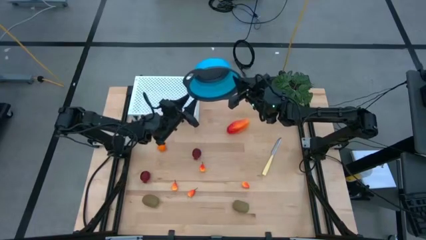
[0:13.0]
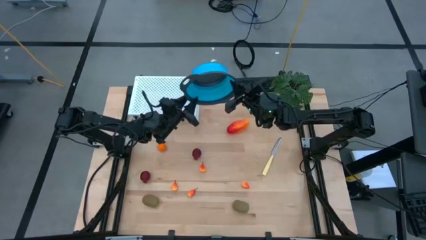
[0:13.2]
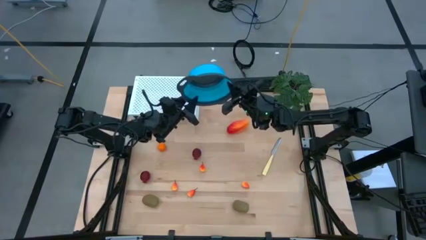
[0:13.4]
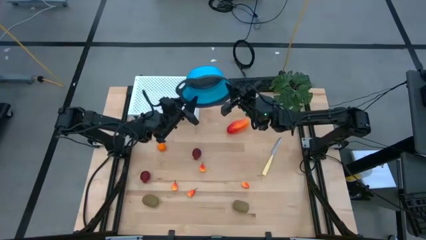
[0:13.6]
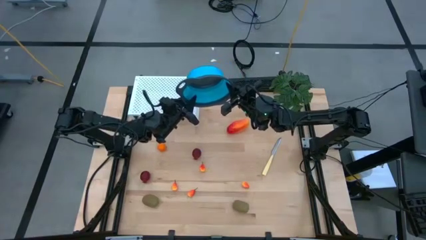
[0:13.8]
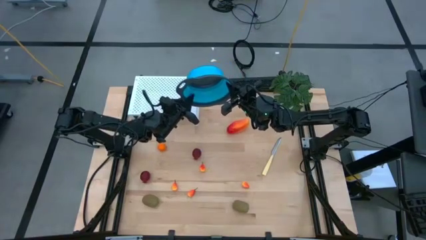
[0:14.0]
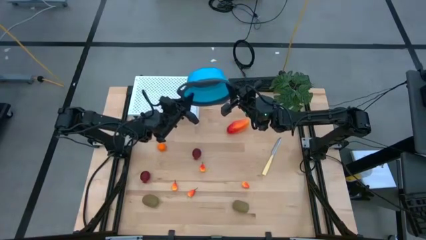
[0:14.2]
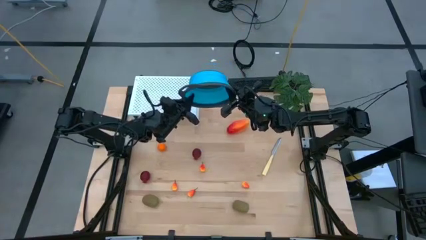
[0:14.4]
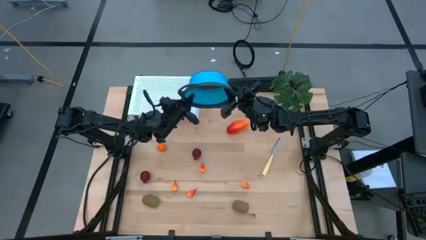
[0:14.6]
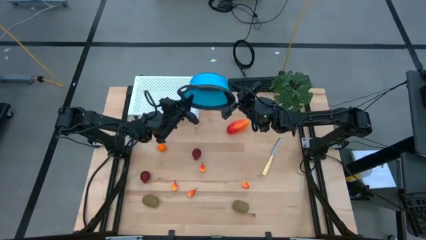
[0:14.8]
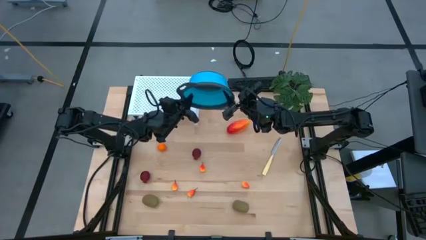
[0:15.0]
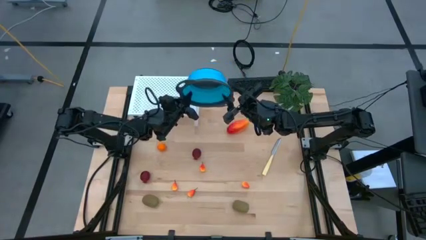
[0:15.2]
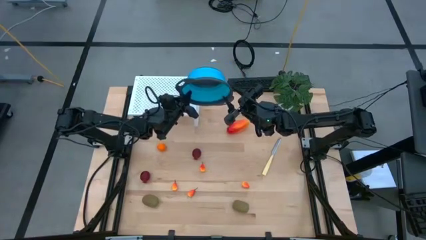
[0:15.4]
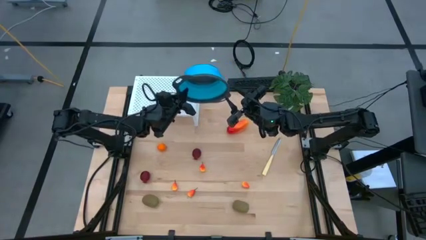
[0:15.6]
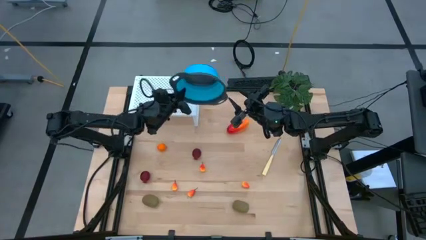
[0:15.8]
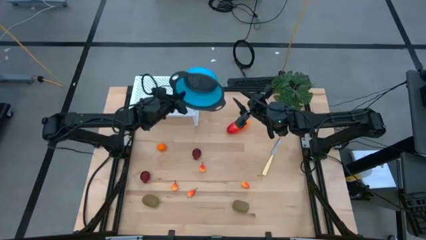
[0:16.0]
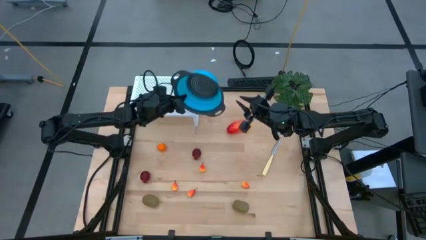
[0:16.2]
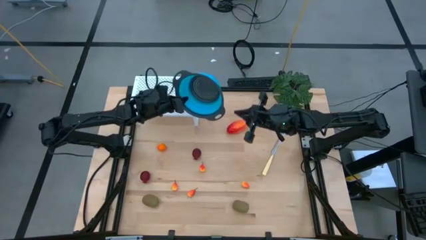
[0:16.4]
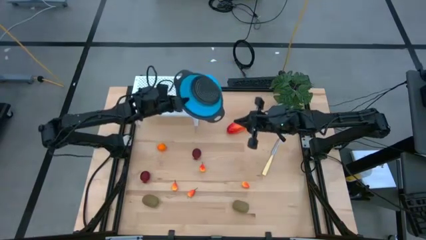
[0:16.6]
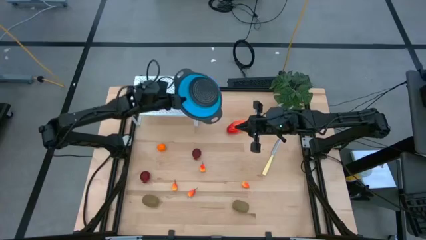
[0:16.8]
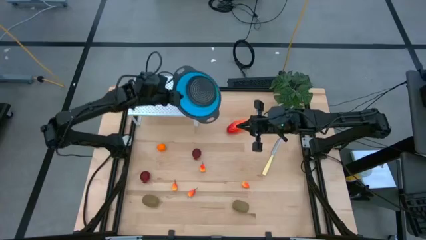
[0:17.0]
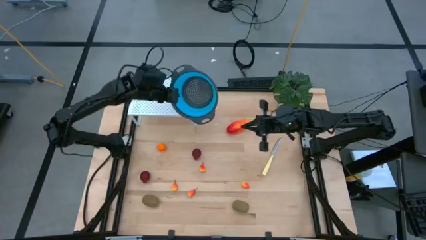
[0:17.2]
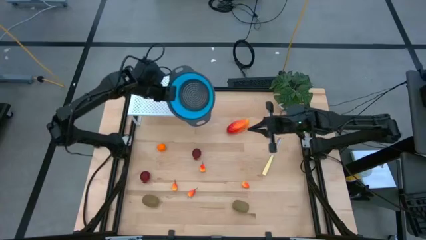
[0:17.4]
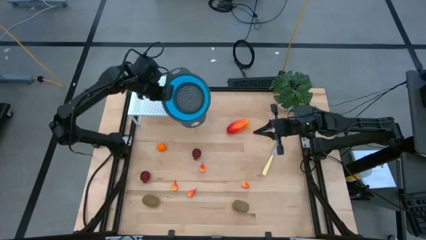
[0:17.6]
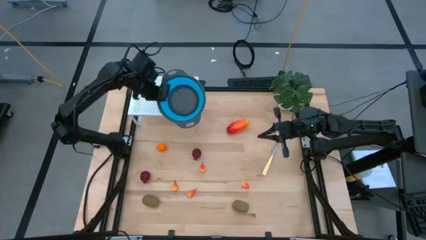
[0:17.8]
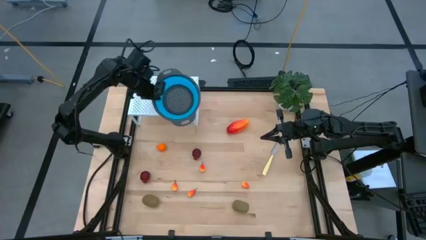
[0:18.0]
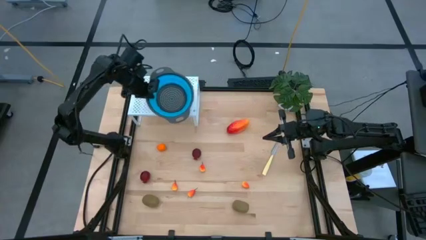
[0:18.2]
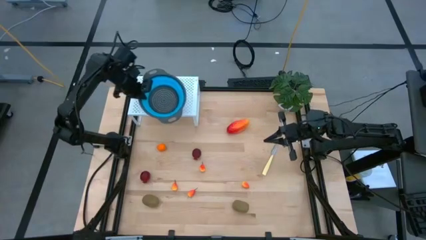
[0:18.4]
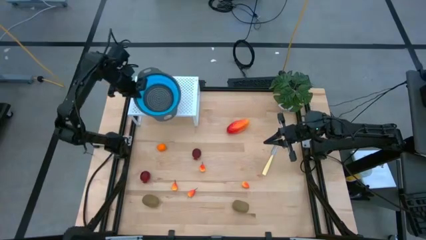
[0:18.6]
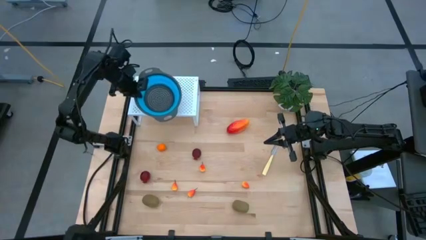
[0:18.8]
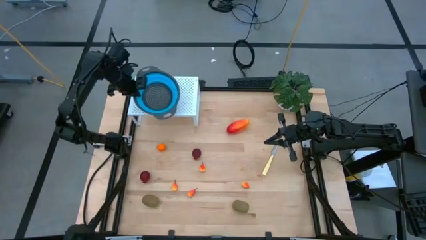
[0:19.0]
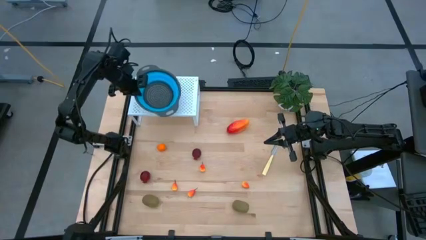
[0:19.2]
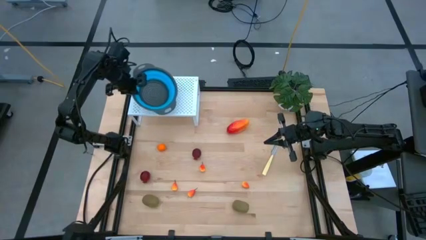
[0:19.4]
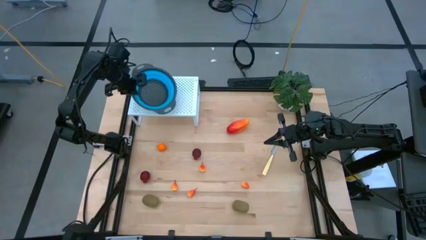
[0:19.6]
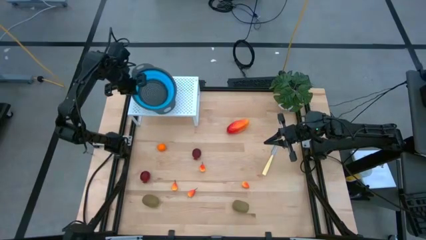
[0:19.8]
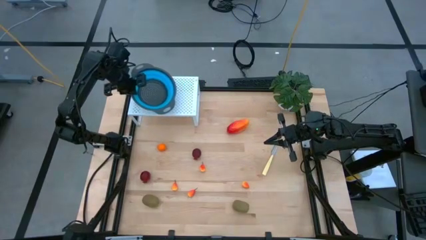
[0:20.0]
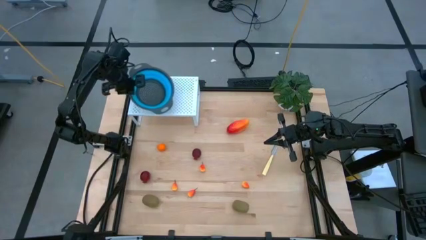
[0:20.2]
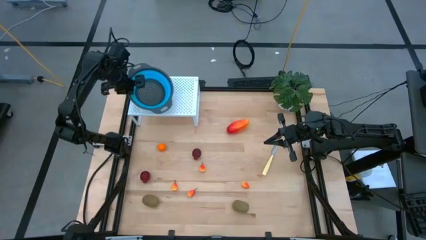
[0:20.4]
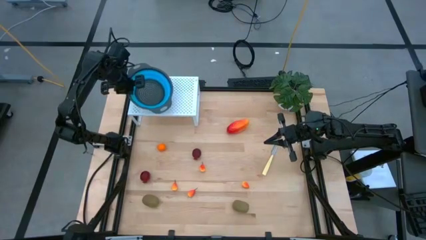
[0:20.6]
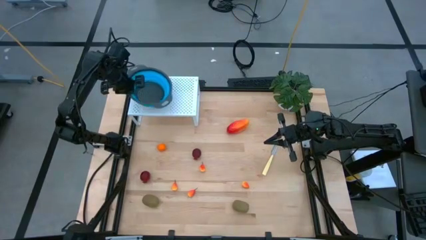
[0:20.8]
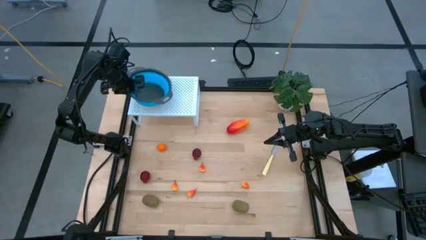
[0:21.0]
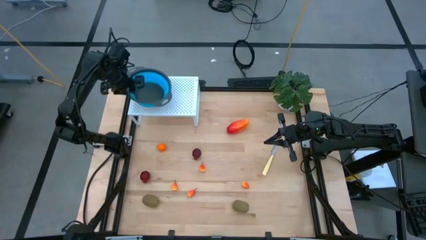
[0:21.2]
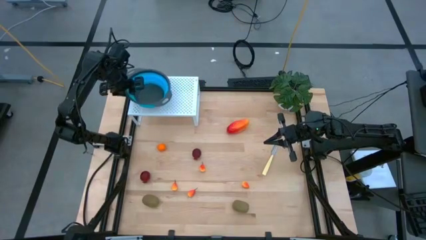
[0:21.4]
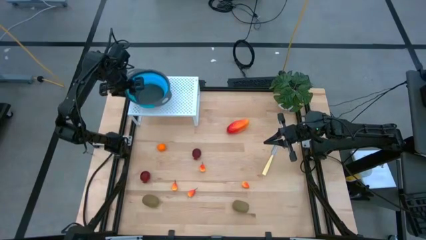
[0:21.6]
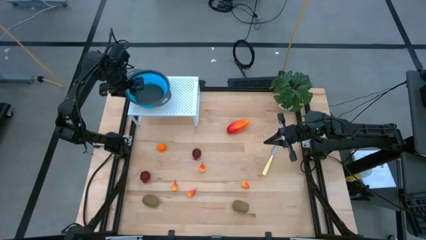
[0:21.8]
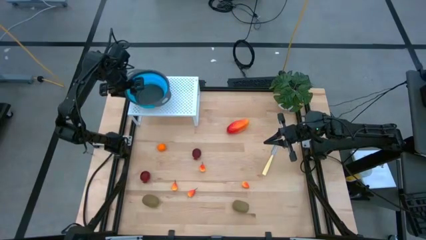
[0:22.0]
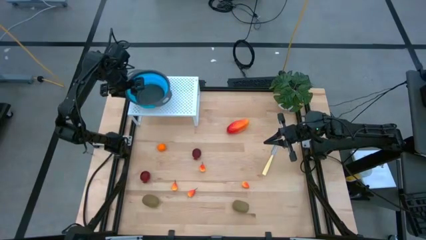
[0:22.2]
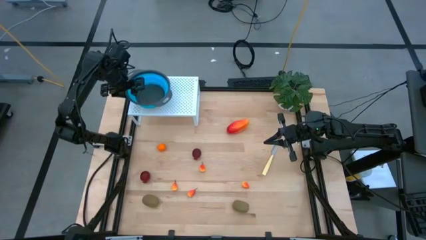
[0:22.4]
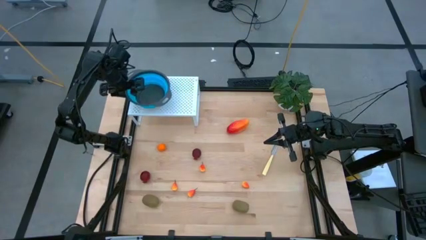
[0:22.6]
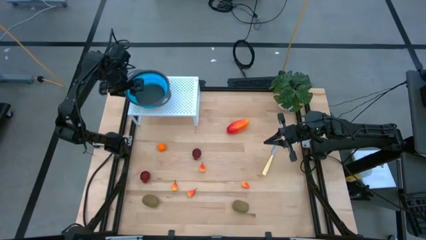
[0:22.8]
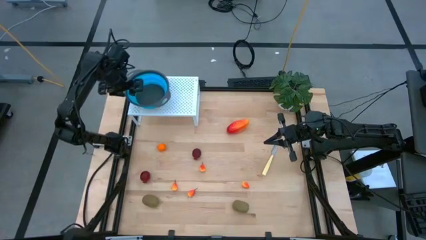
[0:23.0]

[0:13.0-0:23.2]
Task: Pick & Place Fruit
Put the blue strainer bowl on the shelf

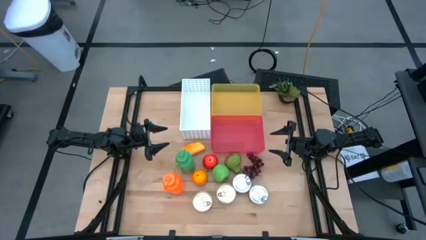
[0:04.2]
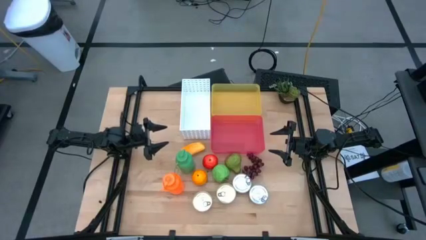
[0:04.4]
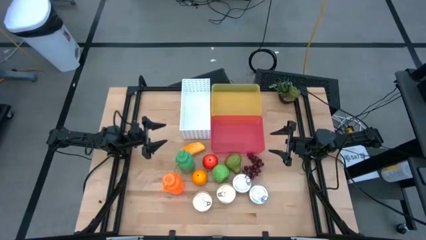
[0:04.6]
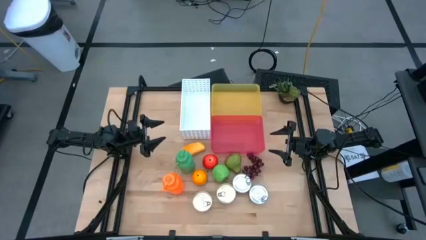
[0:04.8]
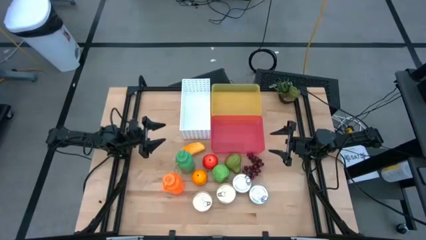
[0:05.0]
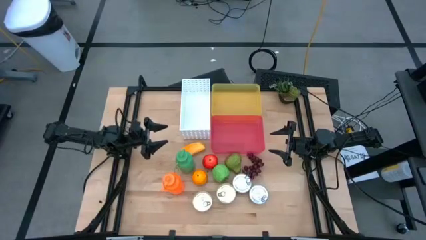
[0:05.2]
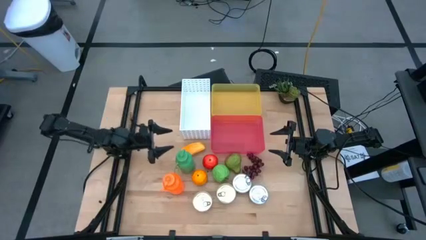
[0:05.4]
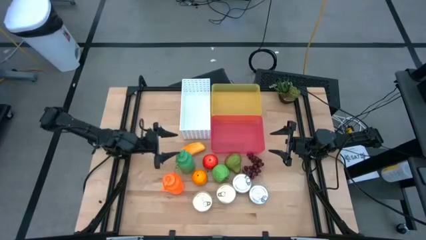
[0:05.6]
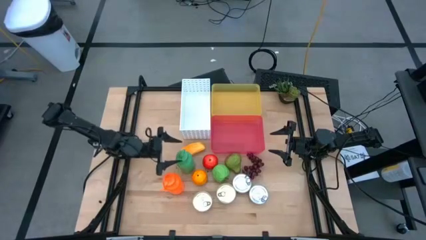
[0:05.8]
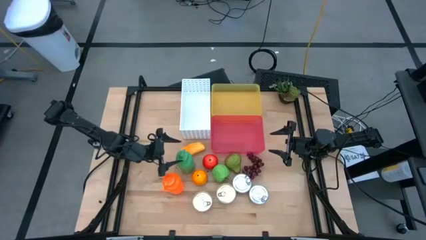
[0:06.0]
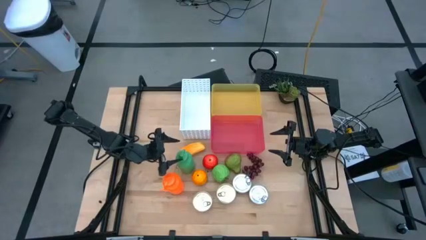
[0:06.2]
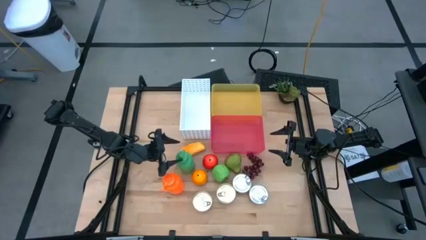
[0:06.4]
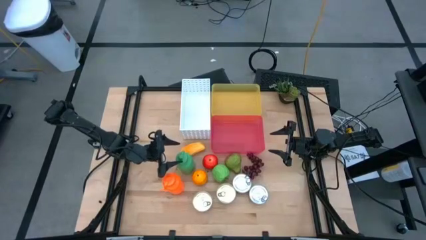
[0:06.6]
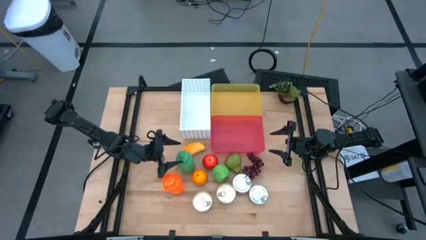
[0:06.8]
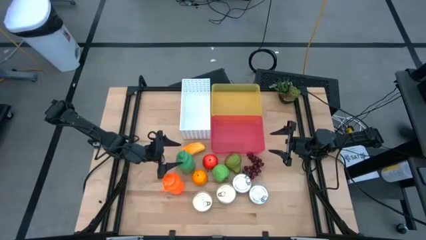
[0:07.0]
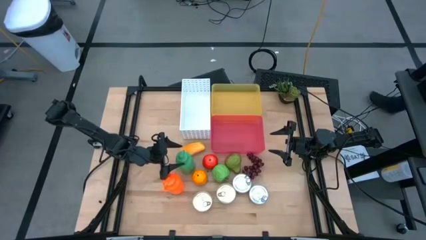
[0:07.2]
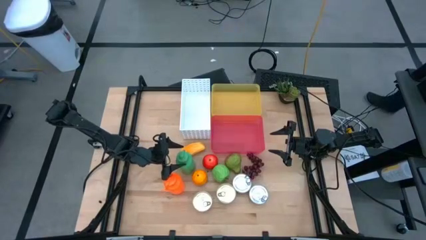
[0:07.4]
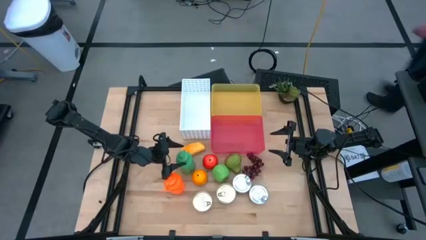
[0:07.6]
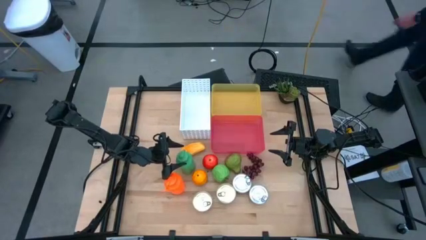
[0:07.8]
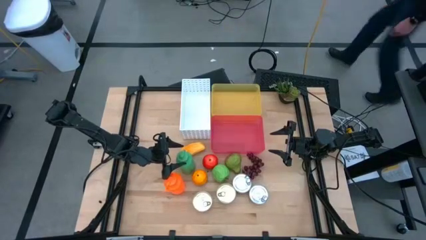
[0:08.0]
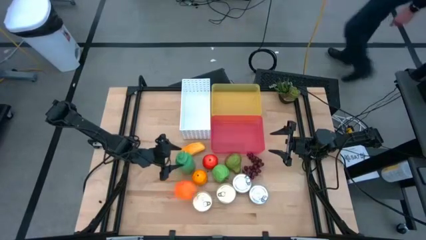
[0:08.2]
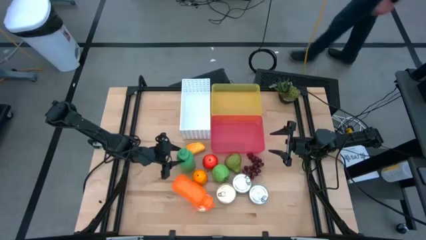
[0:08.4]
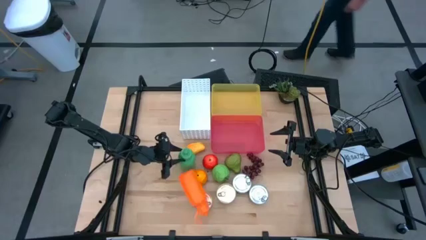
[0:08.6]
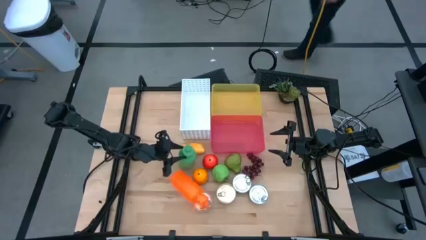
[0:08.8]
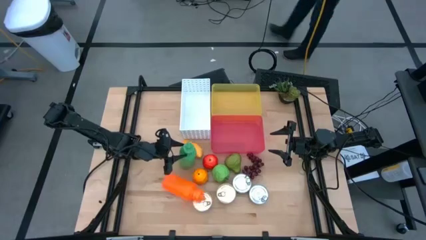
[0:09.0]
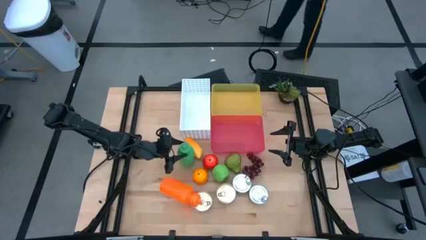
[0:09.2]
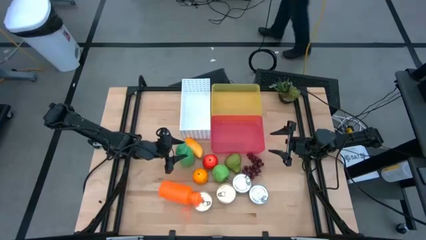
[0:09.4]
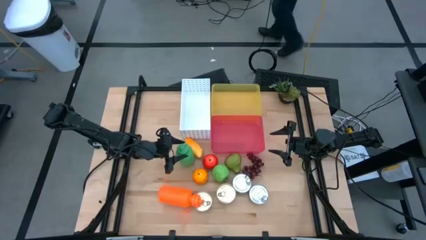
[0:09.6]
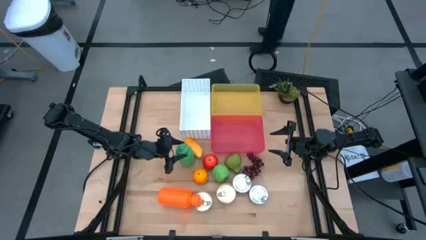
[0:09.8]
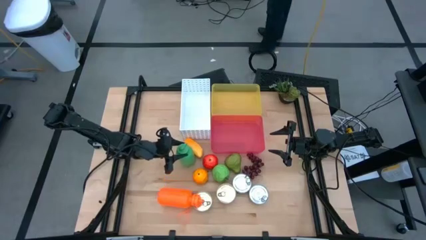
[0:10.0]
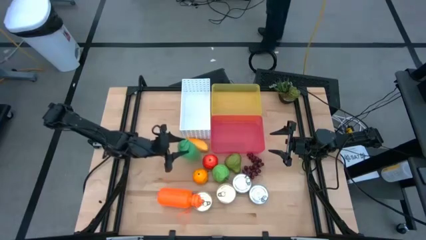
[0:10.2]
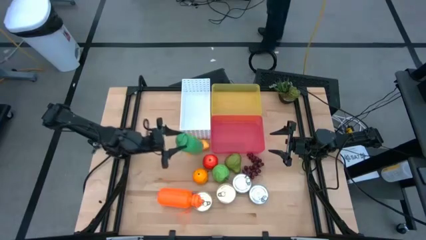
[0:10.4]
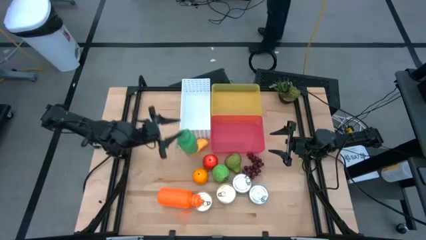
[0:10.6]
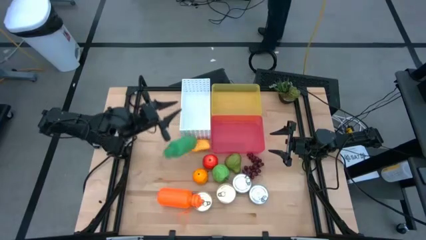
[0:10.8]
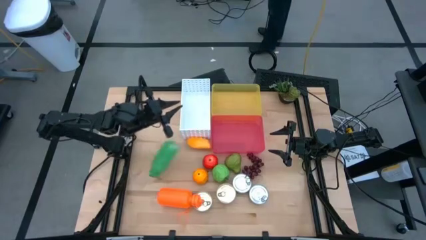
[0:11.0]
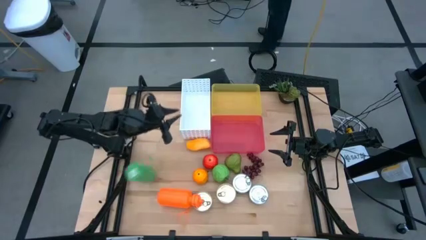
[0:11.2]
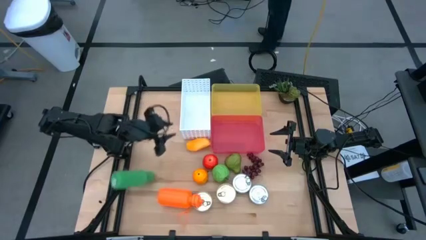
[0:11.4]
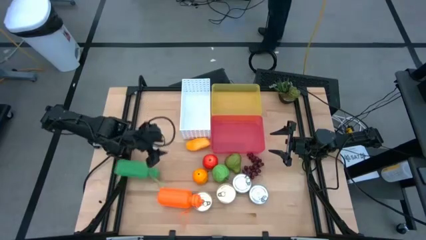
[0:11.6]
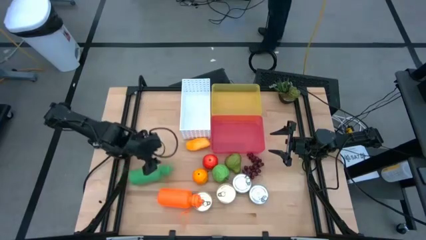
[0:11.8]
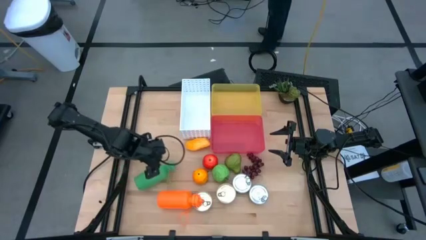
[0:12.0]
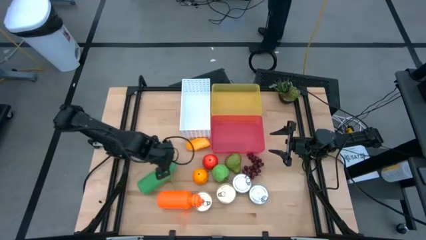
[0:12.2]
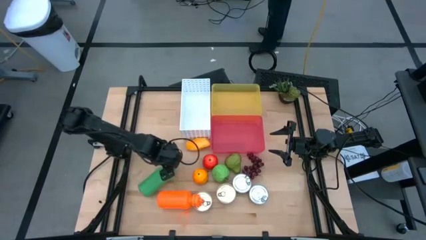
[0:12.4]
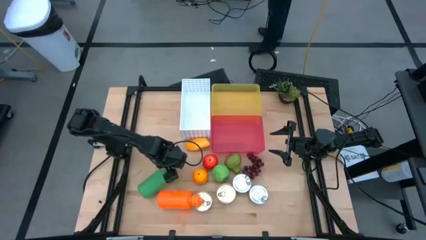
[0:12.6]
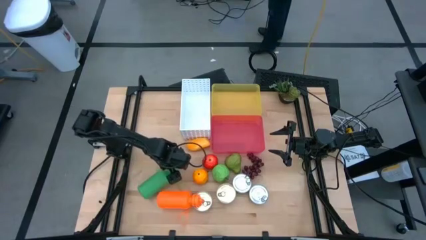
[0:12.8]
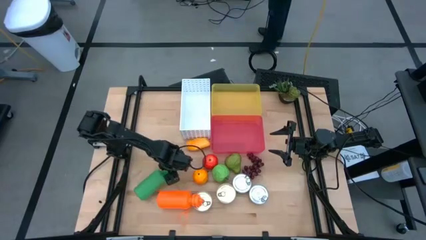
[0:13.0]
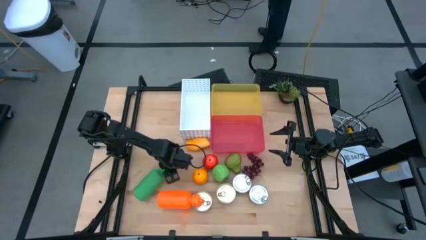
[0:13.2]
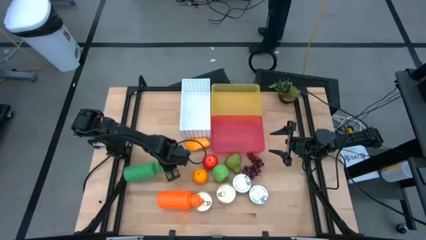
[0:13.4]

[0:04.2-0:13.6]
Task: Pick & Place Food Item
Put the green water bottle into the white bin
